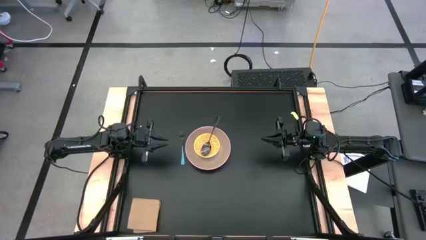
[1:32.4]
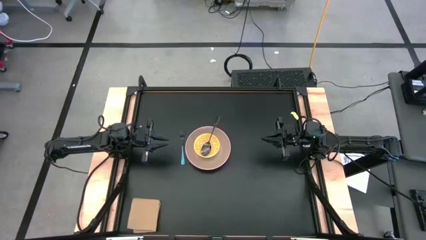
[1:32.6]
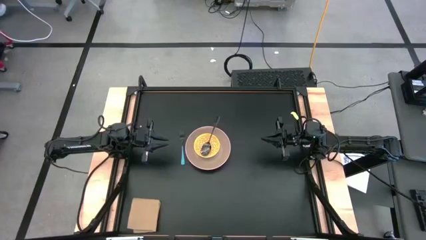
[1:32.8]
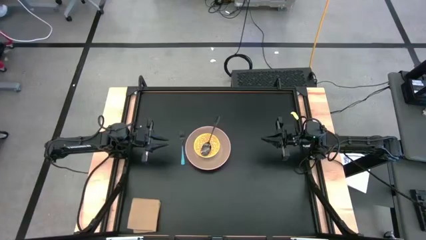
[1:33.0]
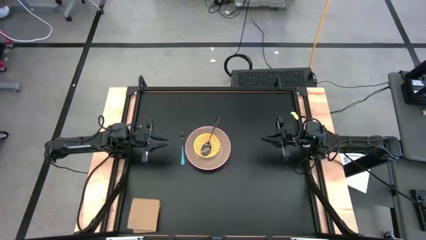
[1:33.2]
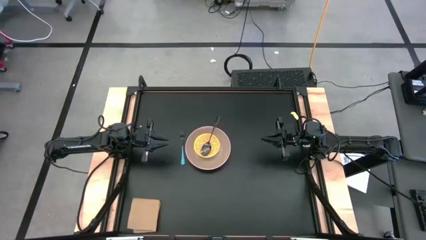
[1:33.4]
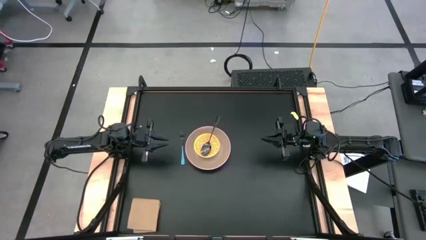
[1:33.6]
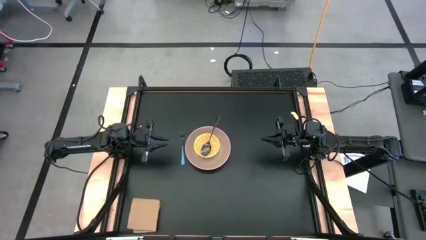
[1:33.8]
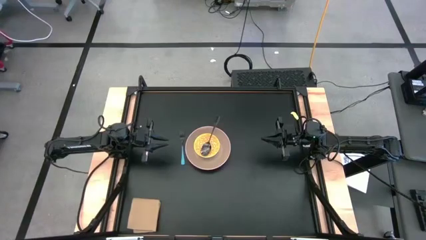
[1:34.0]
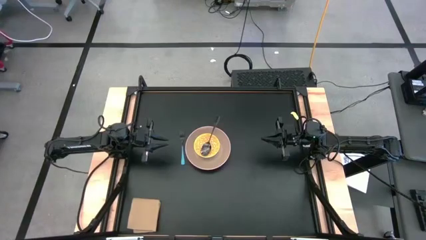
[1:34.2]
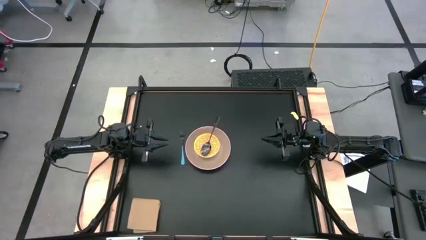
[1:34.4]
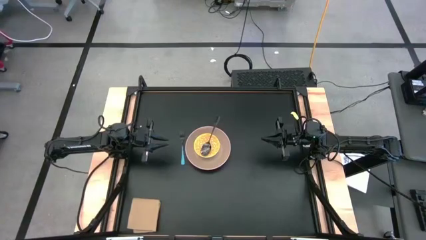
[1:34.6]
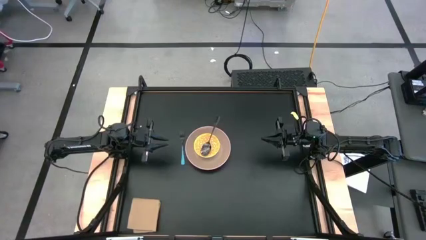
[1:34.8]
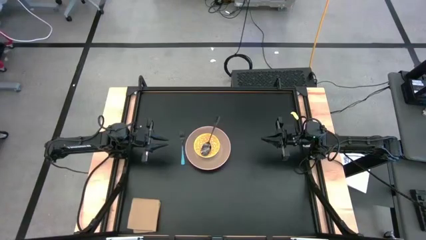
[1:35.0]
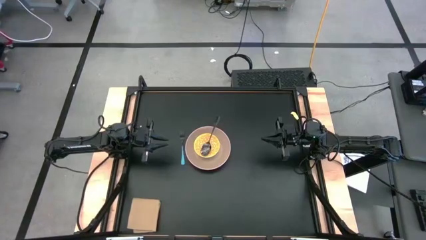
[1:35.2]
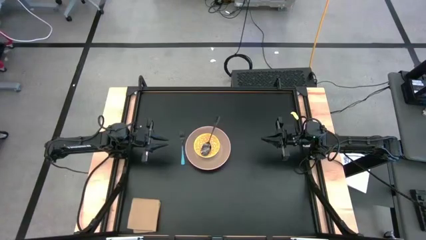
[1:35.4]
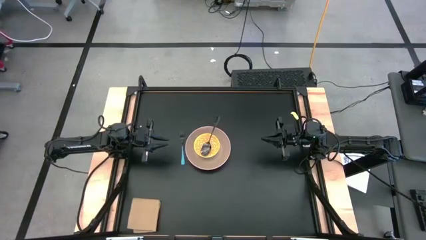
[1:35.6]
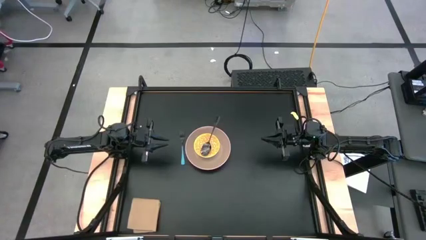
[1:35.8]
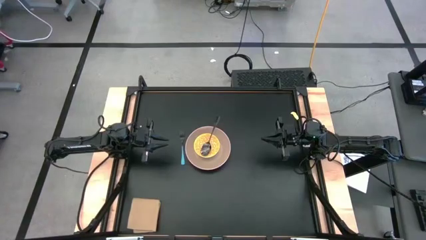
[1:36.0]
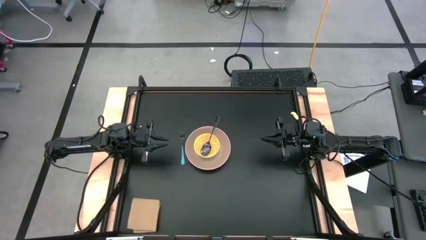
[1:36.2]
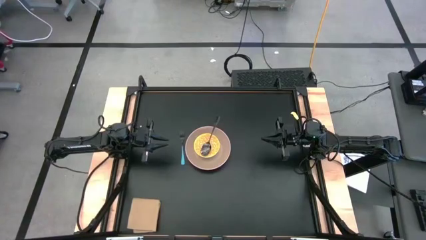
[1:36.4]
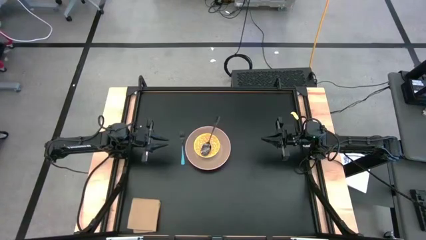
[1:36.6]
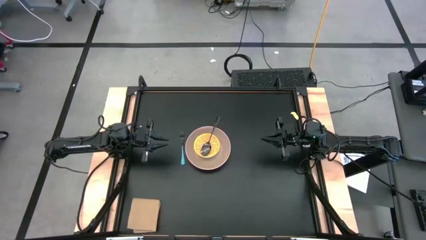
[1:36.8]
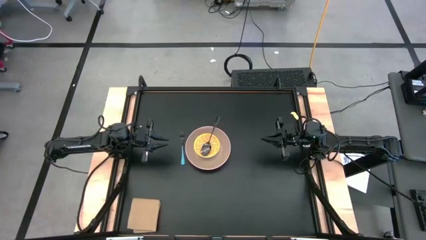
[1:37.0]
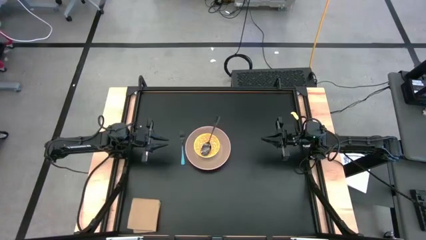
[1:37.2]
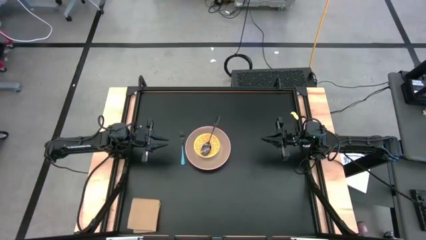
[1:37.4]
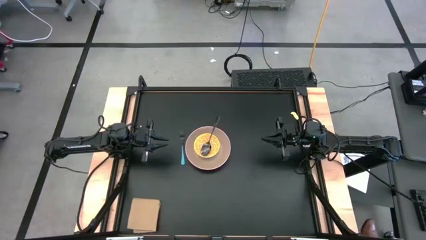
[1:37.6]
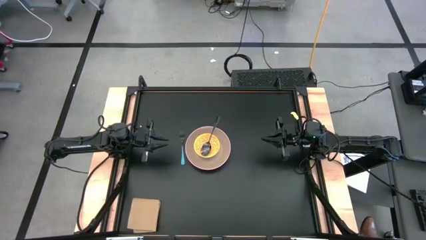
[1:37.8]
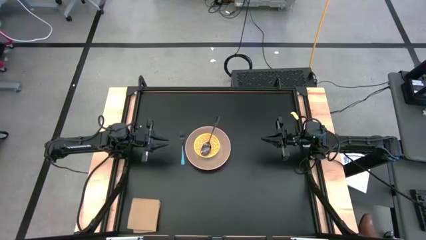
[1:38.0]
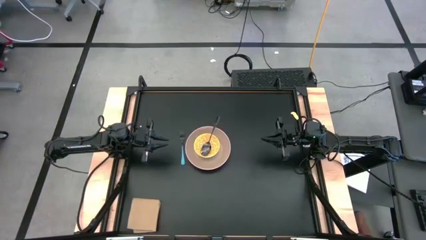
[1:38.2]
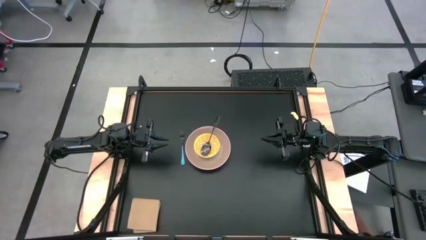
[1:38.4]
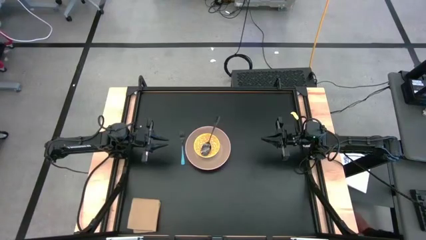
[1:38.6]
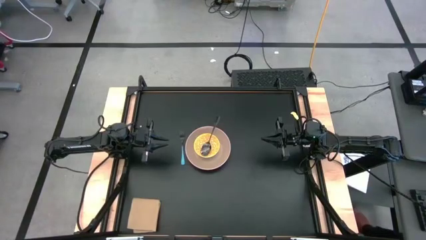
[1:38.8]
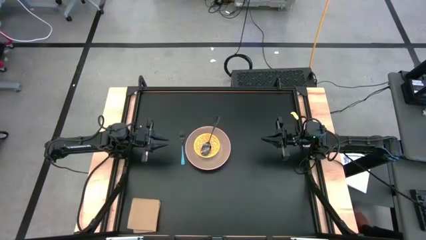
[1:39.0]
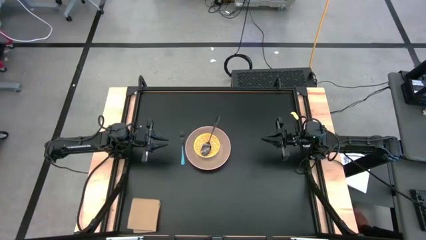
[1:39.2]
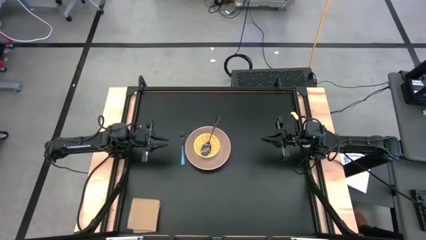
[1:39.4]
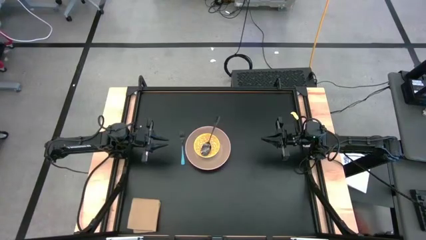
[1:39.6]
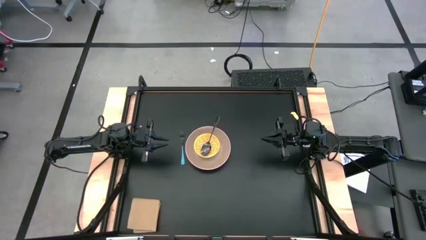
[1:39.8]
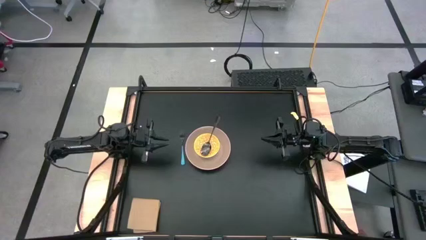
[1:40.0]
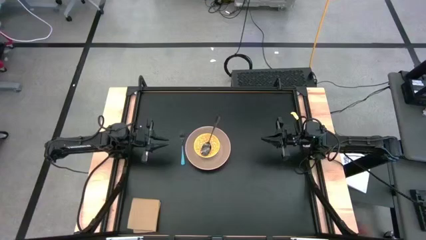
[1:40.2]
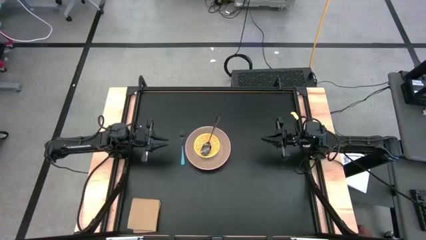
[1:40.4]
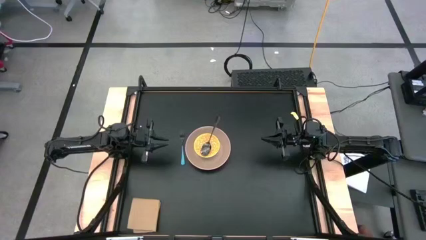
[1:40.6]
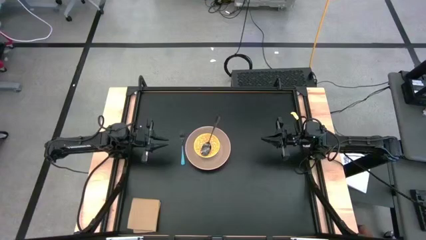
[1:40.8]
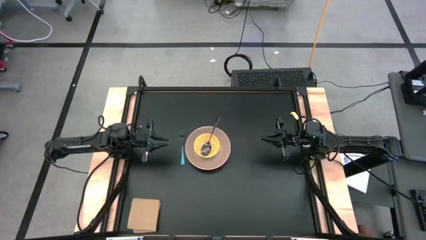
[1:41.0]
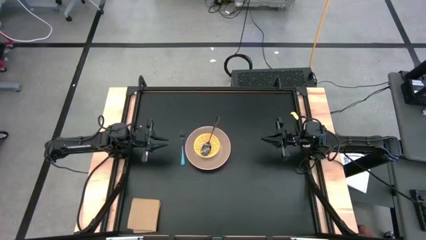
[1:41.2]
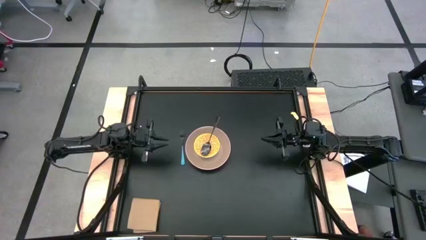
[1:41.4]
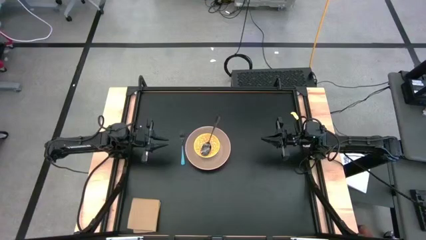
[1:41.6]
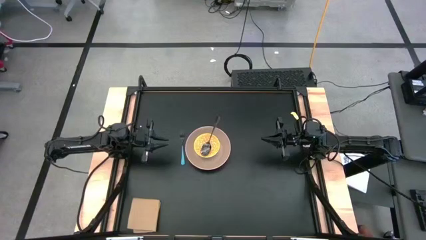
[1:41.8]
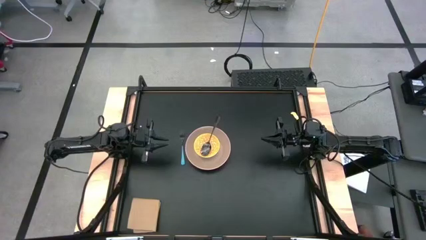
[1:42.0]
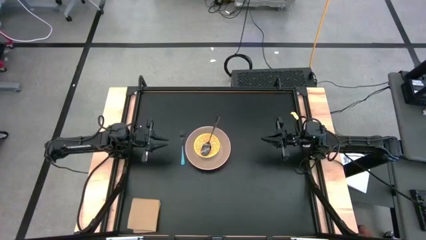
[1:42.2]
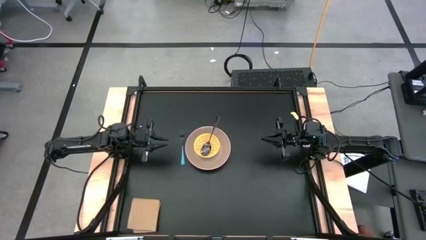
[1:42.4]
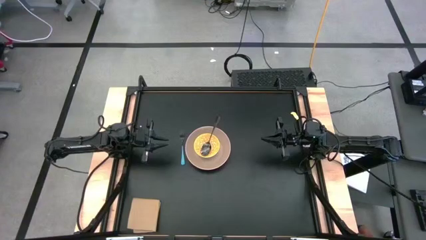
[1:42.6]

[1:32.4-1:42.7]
Task: Set table place
Return to Home Position

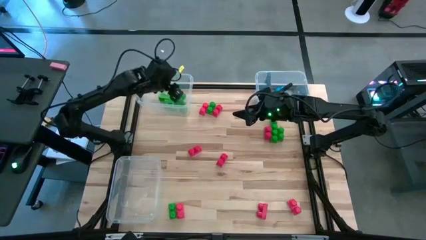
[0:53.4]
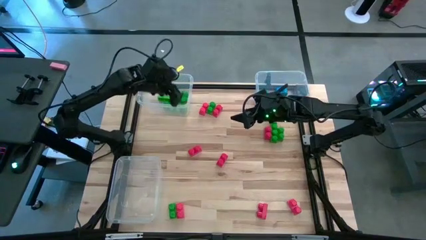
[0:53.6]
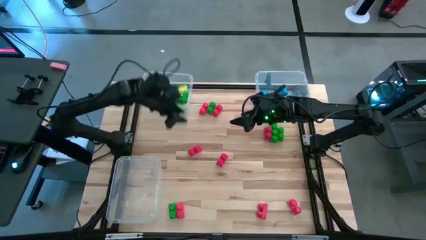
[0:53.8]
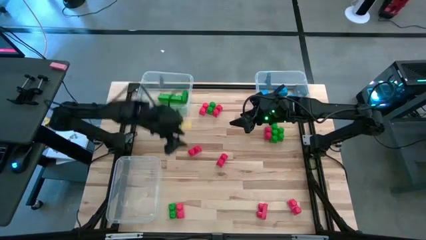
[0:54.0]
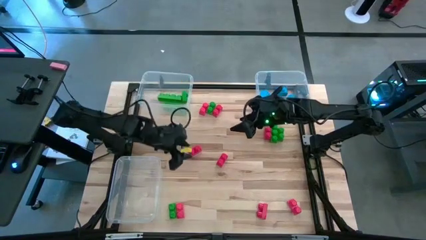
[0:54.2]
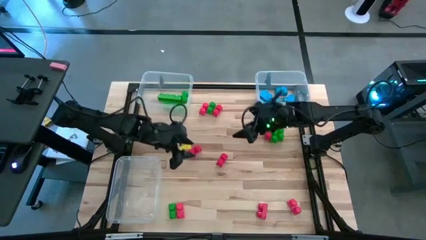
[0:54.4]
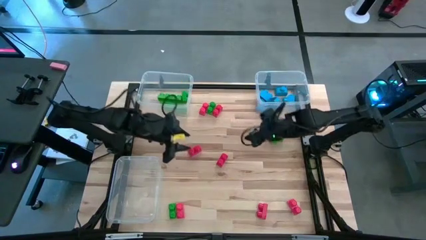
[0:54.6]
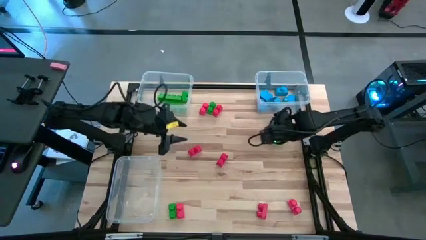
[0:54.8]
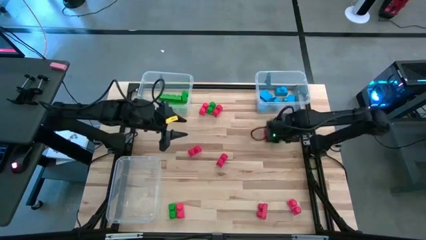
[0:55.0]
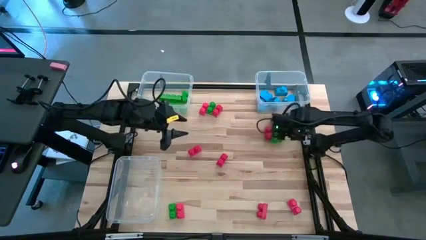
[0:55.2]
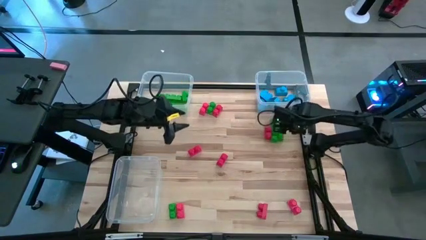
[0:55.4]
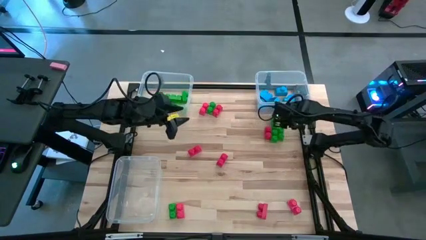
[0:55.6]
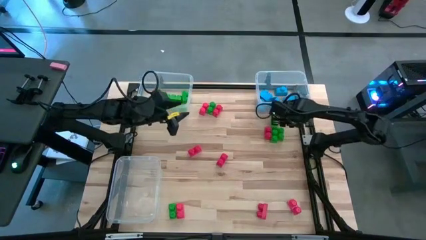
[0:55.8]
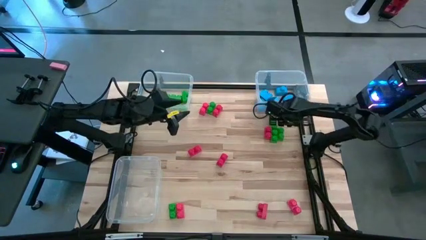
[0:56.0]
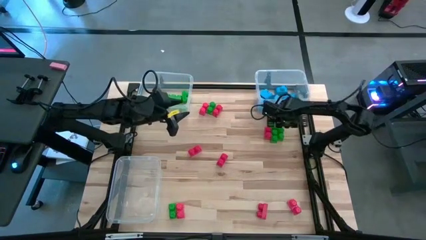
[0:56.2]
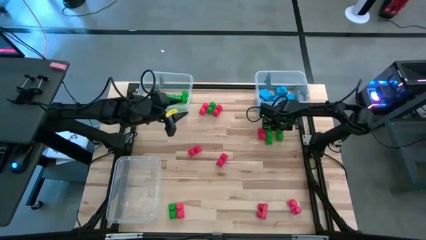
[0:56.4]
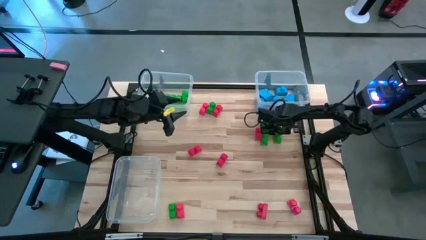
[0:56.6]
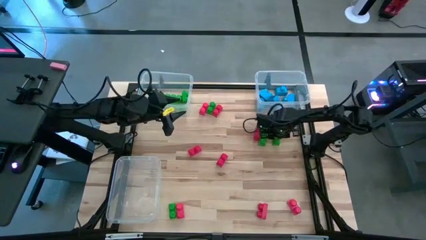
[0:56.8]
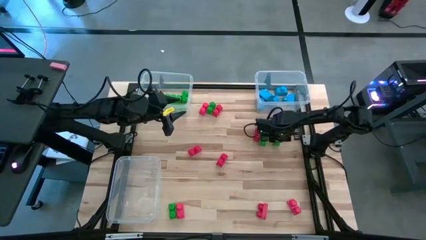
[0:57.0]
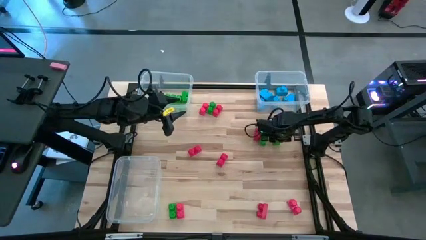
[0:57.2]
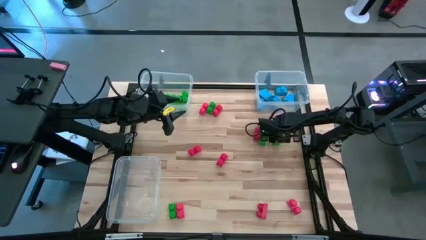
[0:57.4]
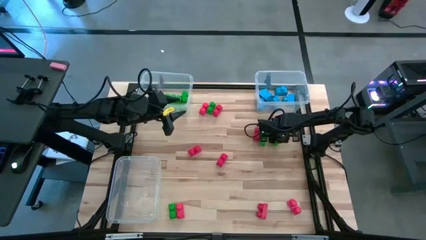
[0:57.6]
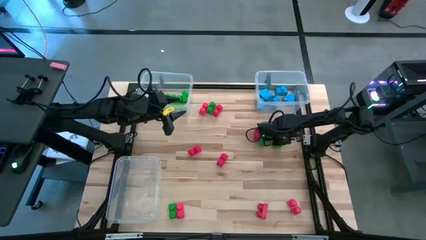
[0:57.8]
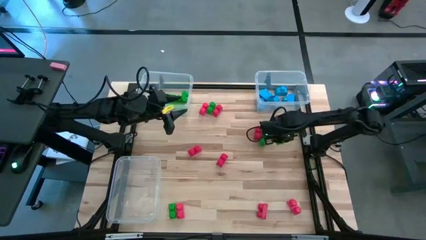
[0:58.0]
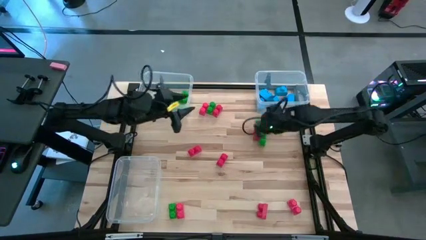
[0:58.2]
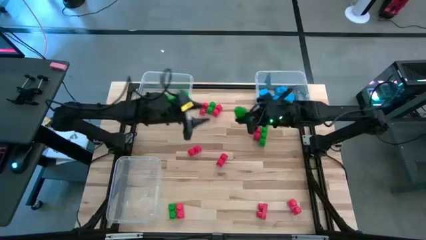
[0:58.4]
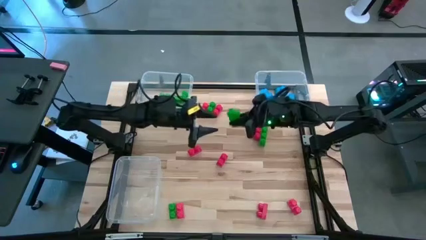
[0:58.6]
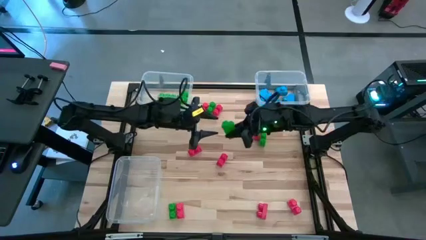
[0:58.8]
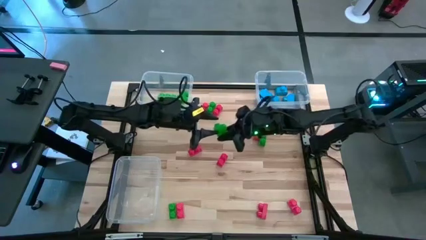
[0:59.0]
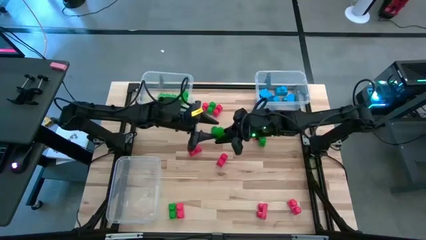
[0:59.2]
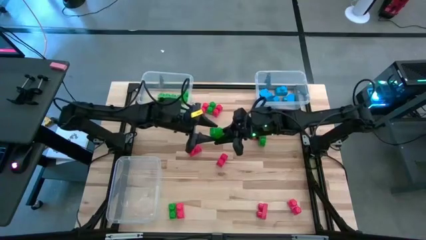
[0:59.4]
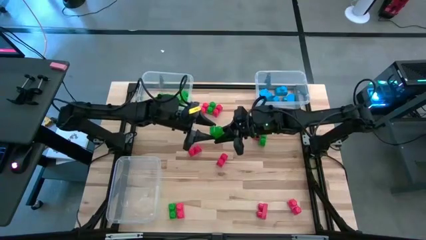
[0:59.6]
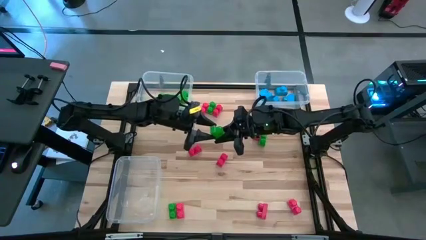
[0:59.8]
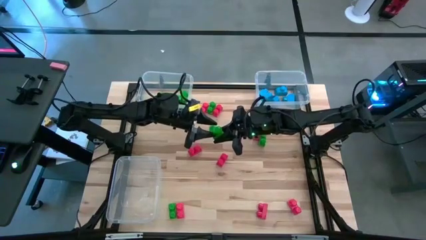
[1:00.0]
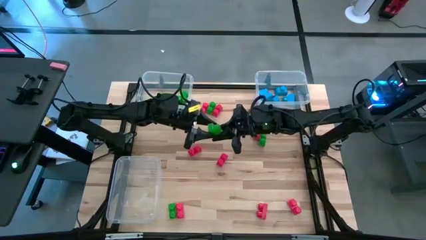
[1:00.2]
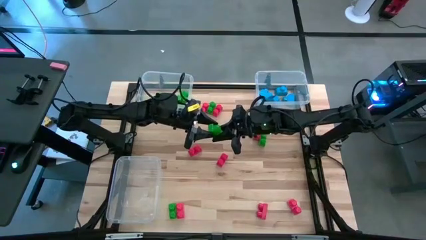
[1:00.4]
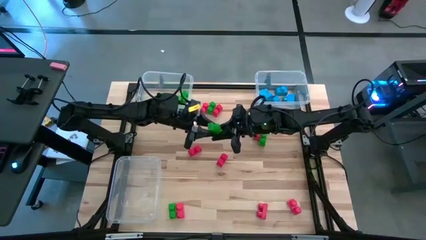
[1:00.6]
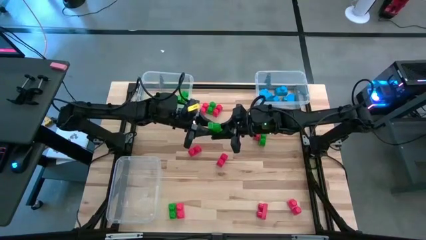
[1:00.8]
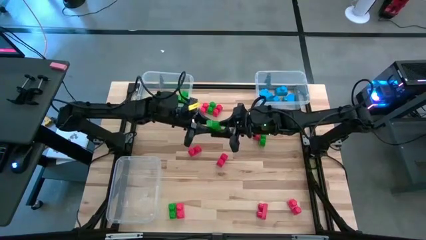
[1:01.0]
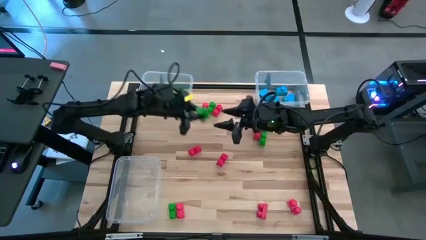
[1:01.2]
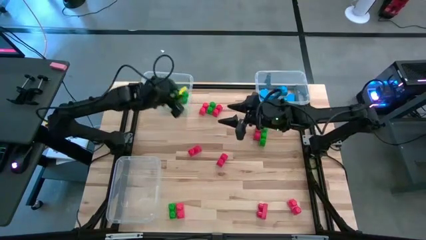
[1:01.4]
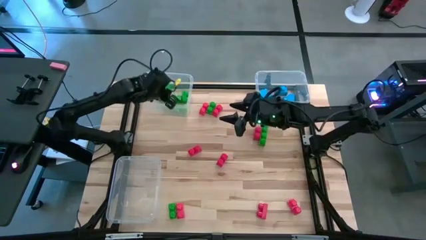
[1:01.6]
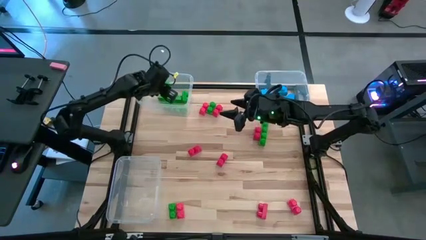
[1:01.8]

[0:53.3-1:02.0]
Task: Sort blocks
Put the green game piece into the top left transparent bin
